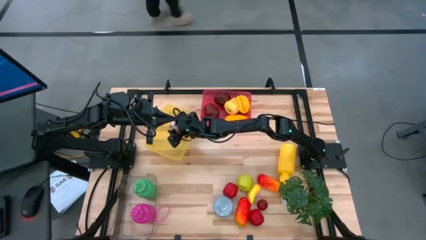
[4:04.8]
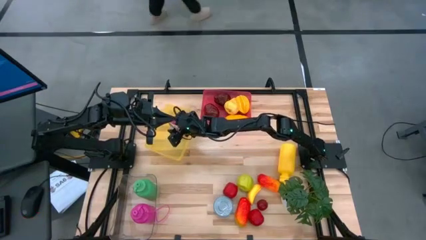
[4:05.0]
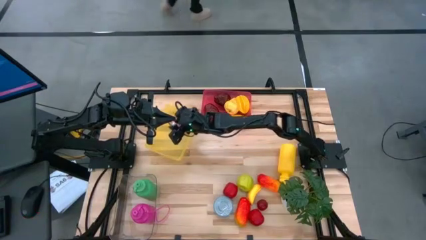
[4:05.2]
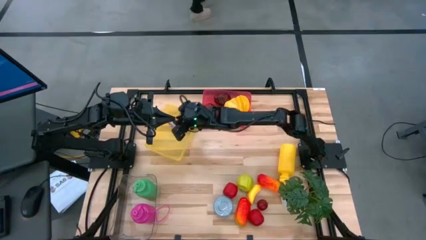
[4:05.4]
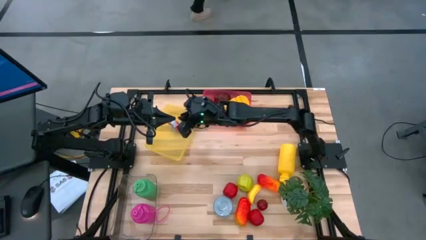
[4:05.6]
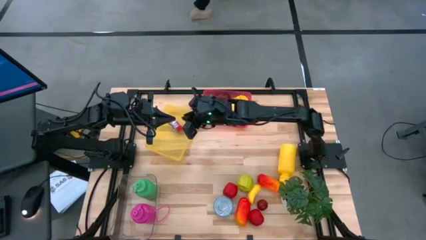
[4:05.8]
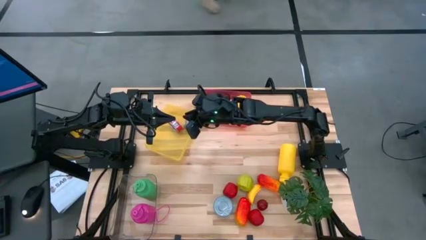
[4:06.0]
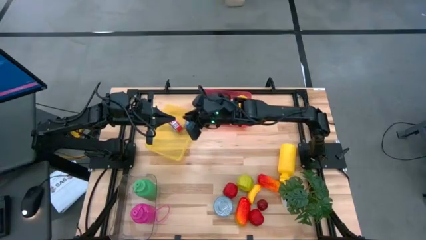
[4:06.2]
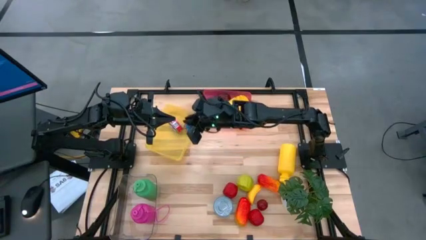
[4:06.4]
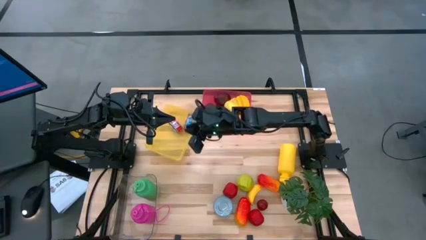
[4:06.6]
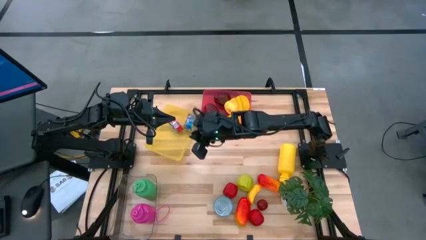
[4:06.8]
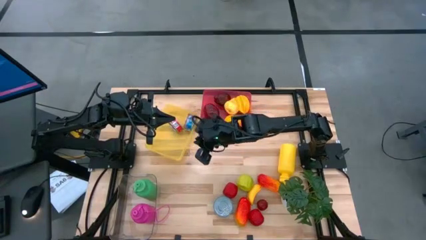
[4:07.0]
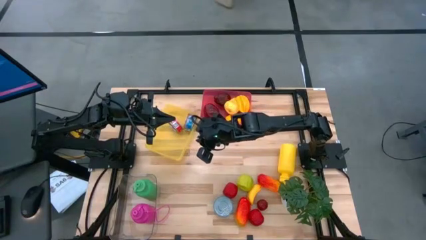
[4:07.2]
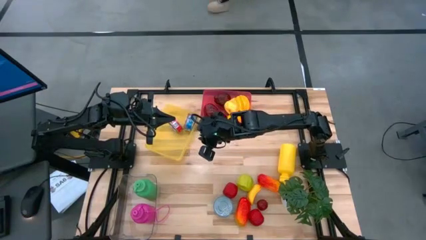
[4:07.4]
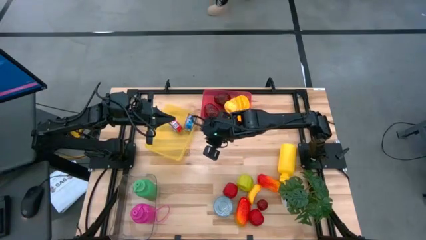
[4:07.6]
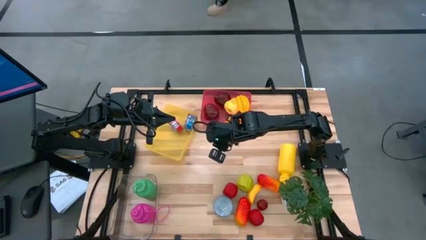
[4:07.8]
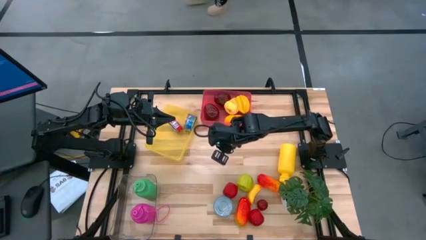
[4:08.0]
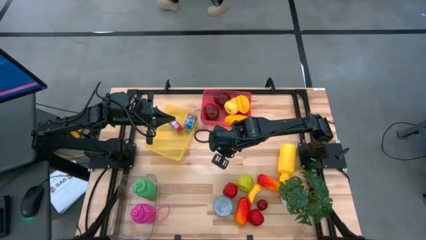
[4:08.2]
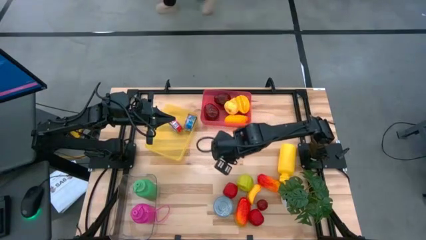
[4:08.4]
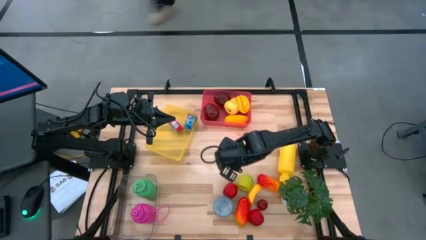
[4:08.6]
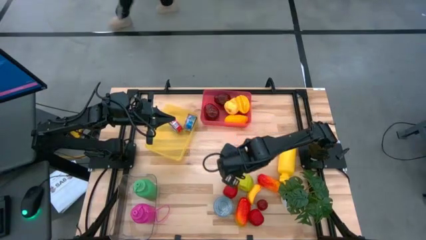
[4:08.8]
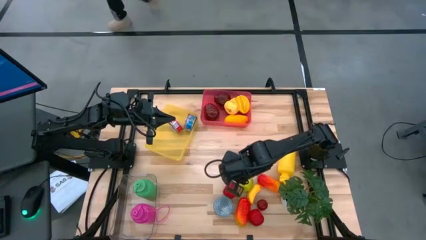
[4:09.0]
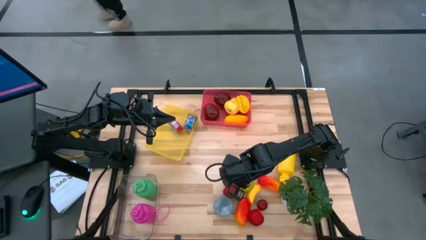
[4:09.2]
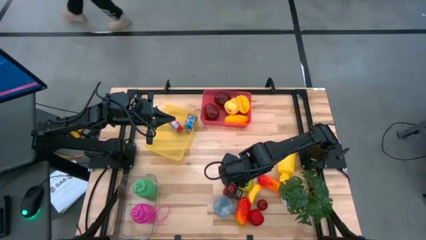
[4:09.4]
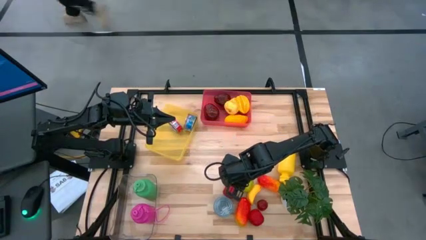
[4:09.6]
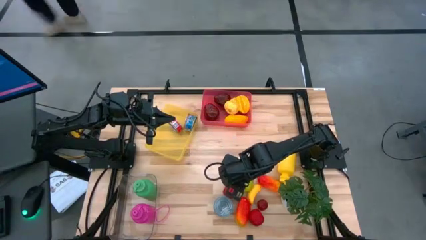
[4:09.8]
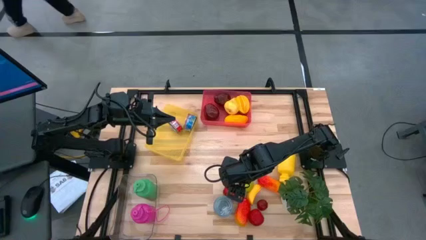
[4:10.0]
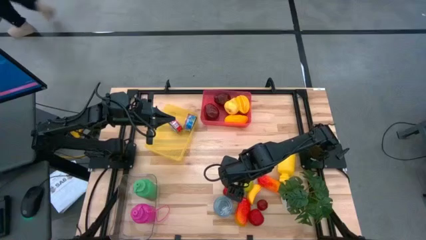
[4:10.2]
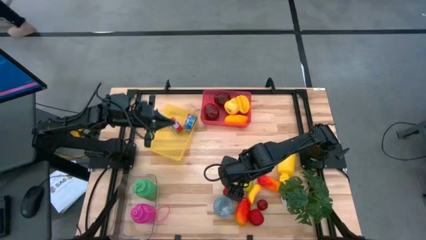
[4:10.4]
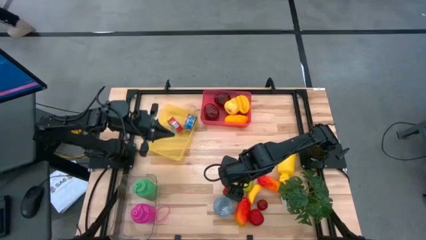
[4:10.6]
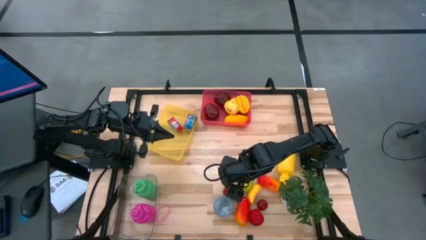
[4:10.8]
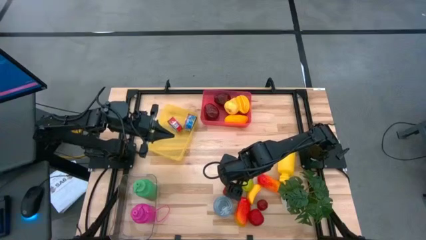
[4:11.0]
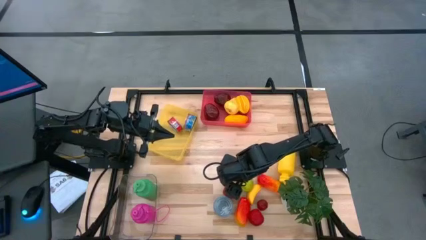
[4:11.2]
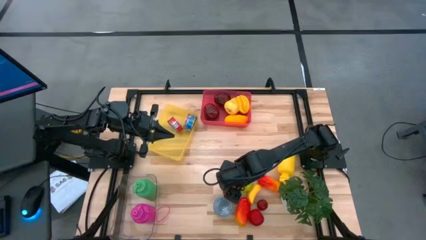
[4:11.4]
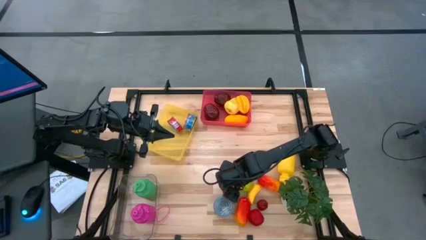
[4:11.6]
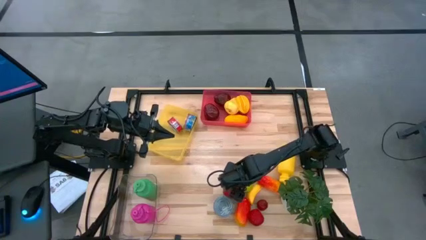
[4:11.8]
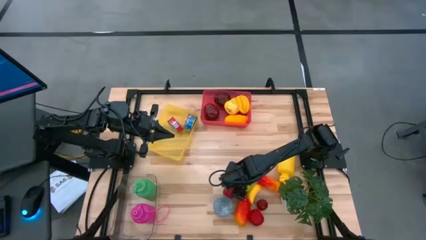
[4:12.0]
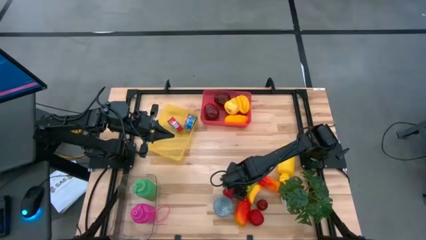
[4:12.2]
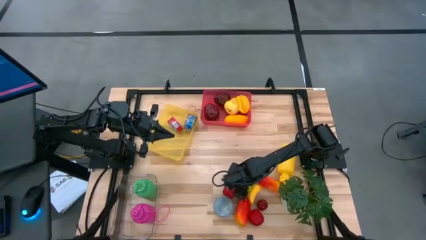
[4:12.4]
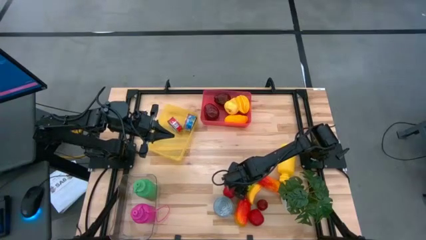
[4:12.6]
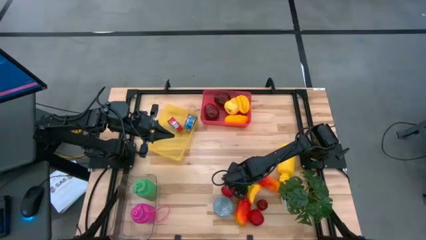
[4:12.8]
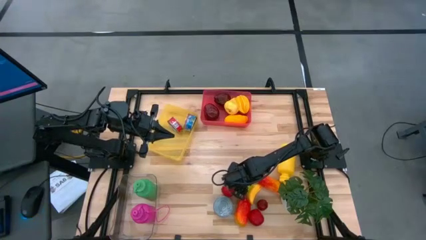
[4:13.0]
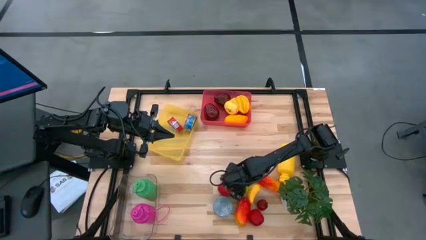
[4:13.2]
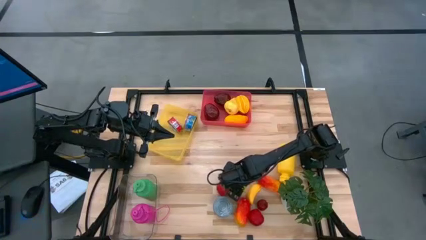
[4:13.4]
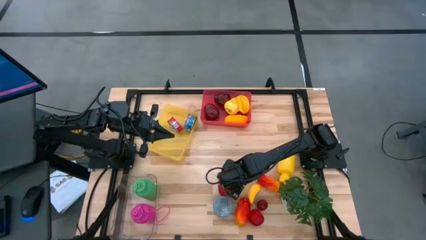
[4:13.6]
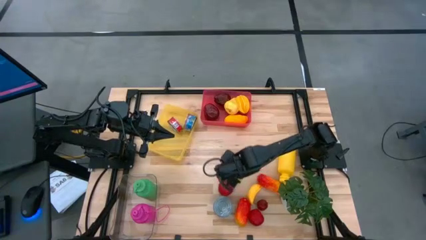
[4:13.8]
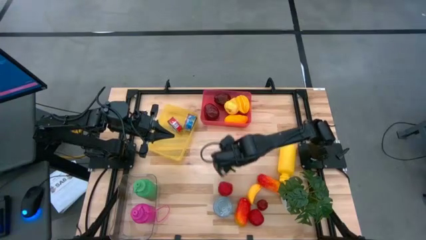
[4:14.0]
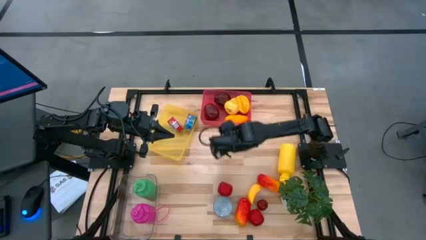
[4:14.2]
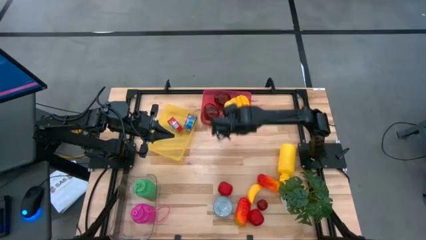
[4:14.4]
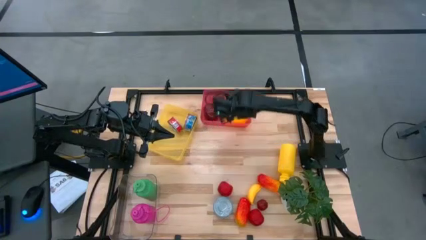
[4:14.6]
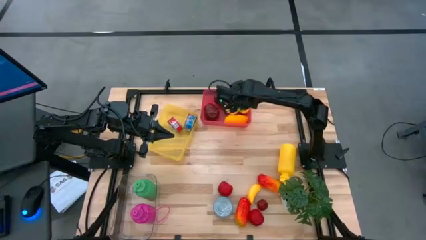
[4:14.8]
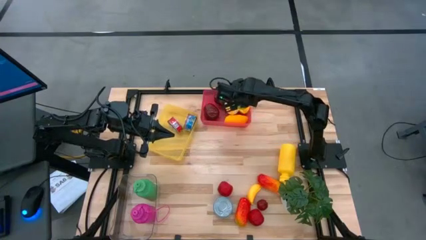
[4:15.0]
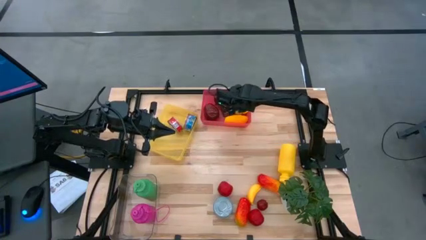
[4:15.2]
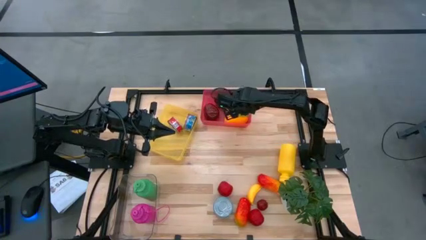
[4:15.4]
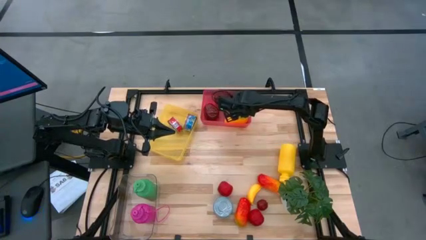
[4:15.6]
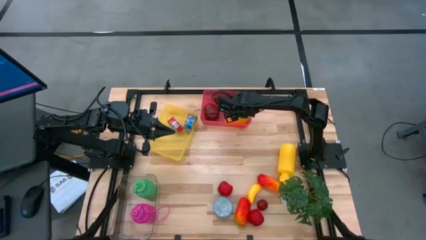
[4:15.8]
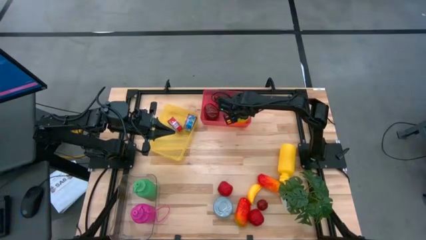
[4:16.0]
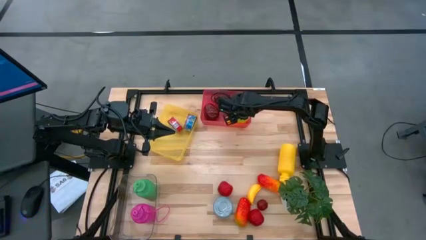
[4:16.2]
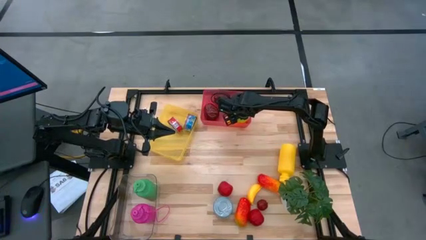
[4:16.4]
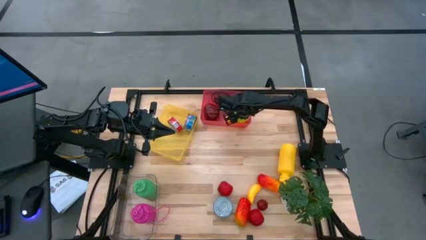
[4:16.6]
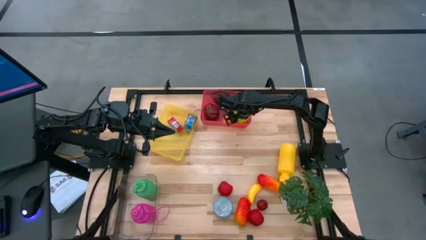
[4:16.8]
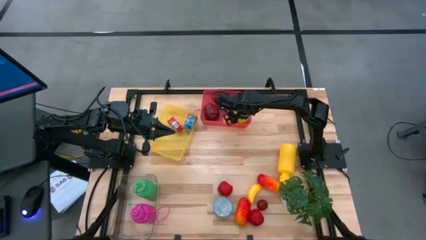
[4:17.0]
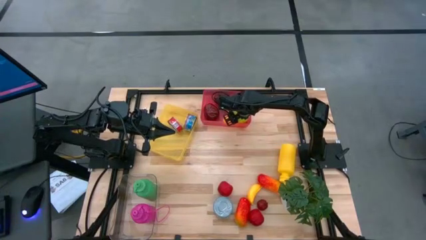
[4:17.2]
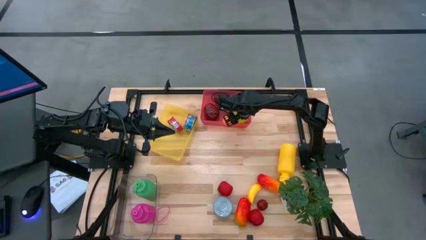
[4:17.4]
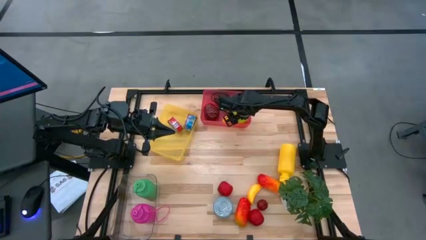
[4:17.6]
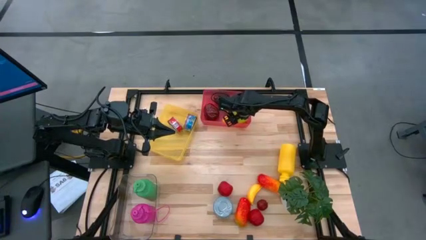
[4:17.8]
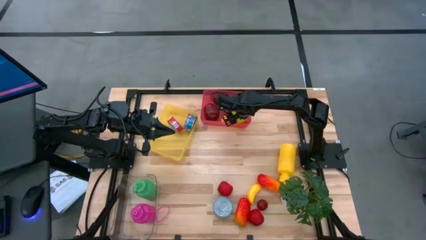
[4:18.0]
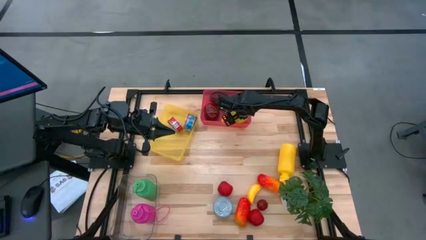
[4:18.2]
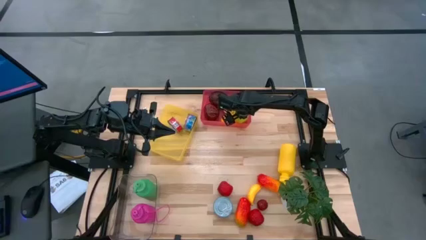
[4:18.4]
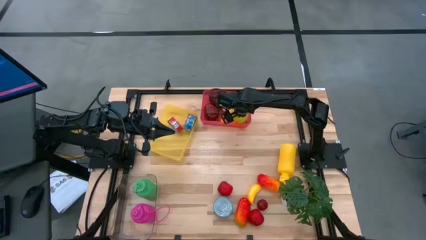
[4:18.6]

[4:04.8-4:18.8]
Task: Pick & Place Food Item
Put the green apple into the pink bin
